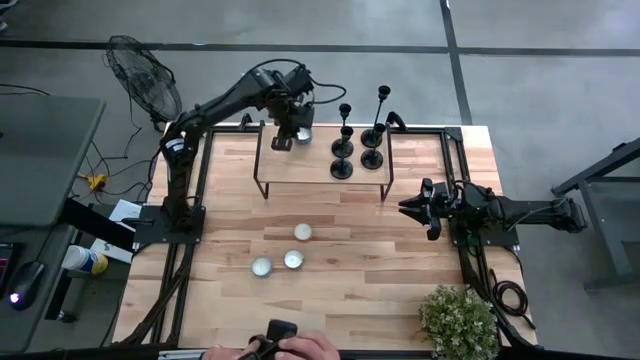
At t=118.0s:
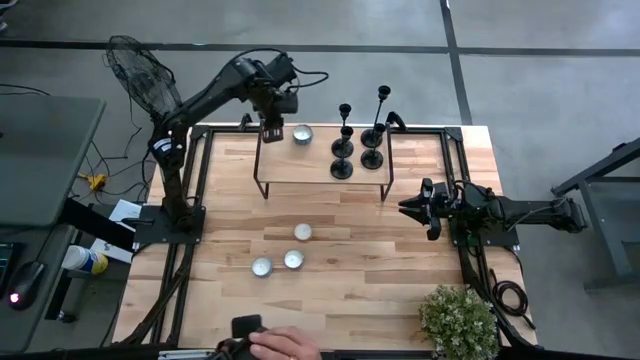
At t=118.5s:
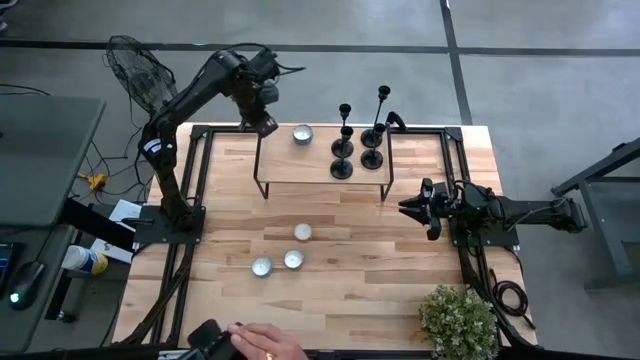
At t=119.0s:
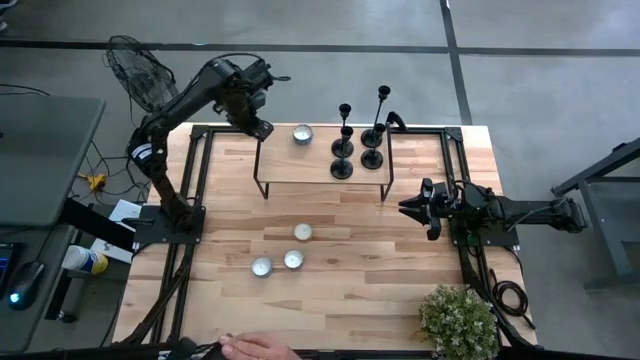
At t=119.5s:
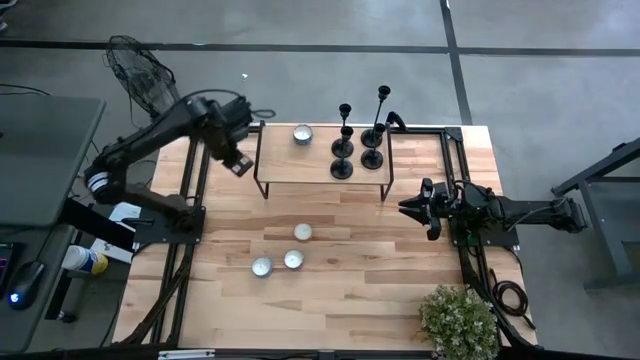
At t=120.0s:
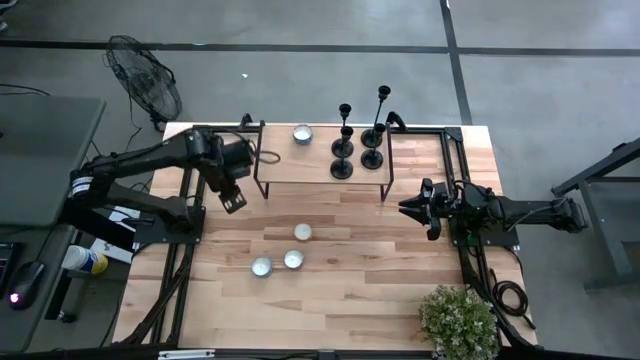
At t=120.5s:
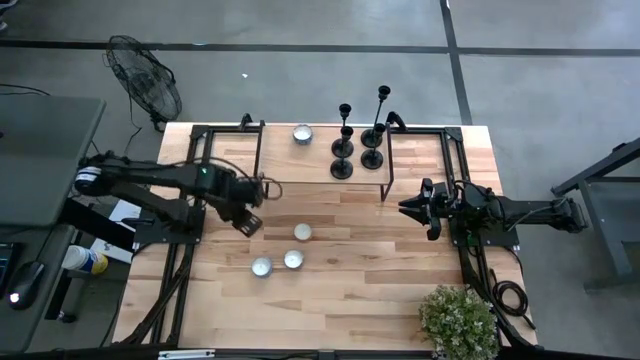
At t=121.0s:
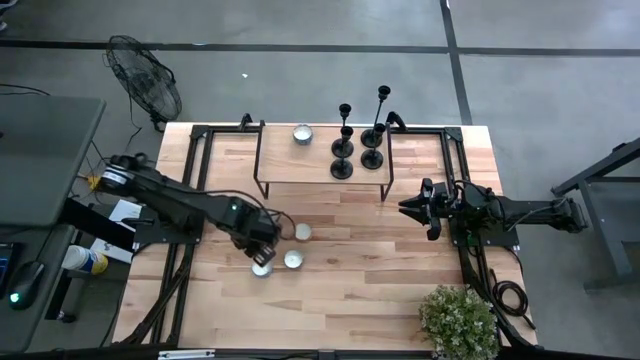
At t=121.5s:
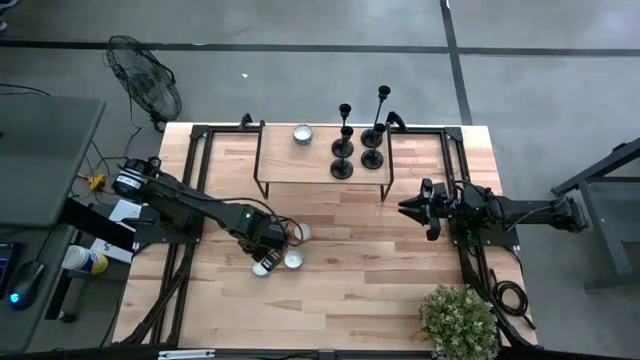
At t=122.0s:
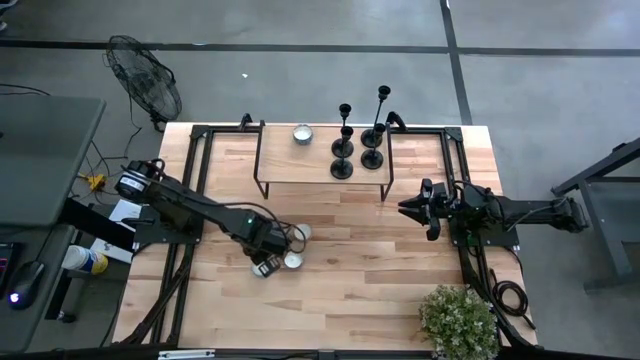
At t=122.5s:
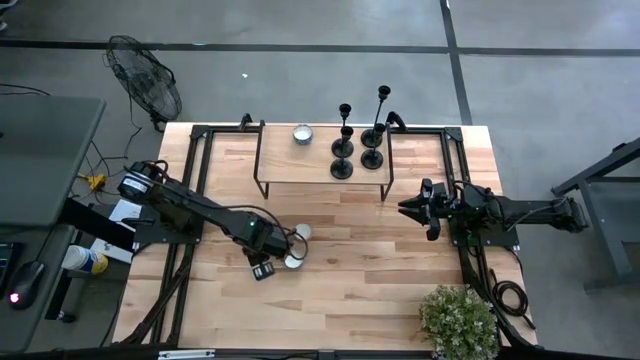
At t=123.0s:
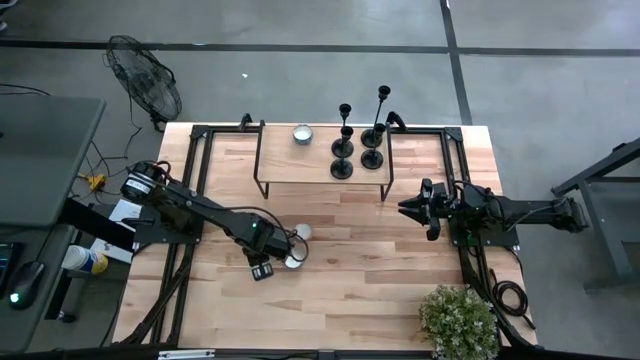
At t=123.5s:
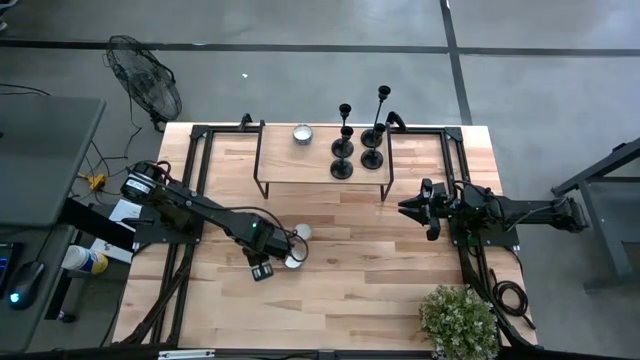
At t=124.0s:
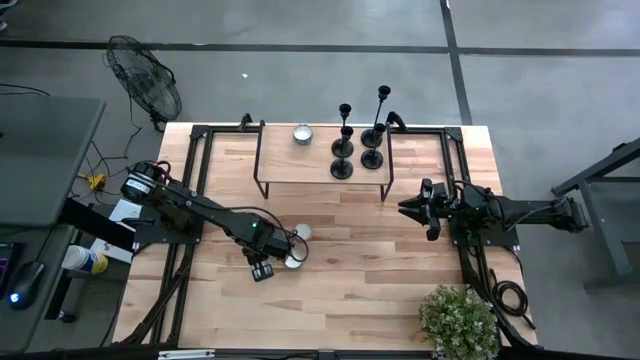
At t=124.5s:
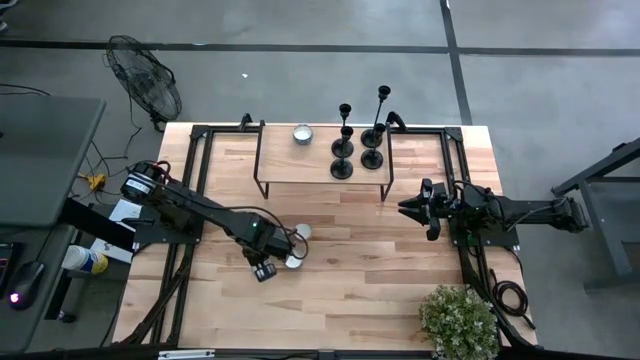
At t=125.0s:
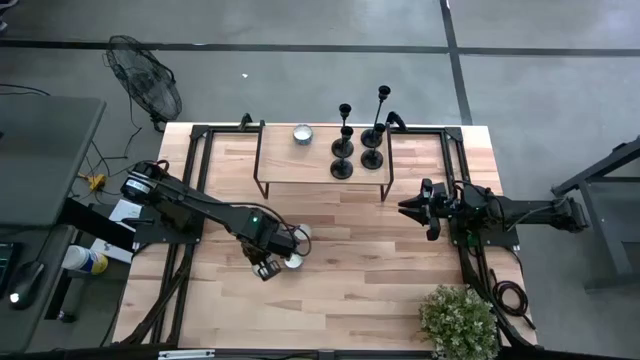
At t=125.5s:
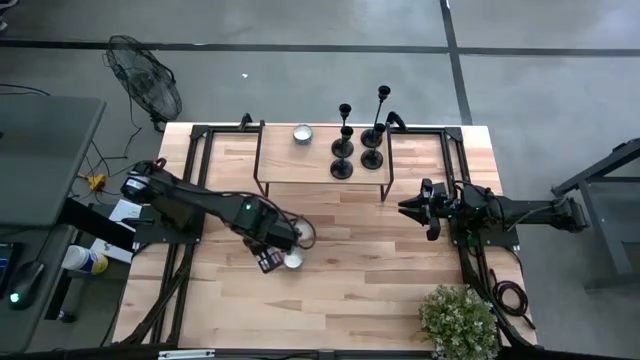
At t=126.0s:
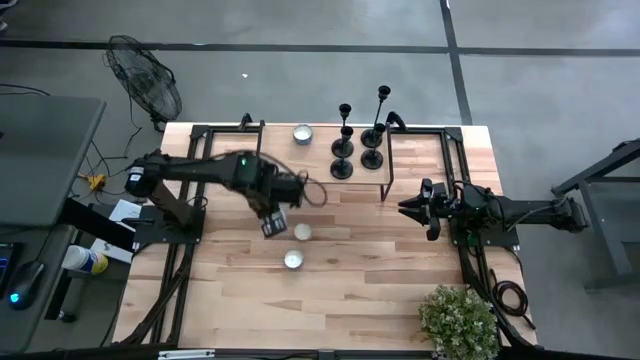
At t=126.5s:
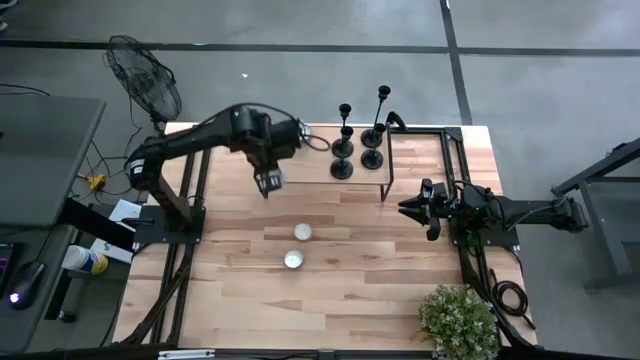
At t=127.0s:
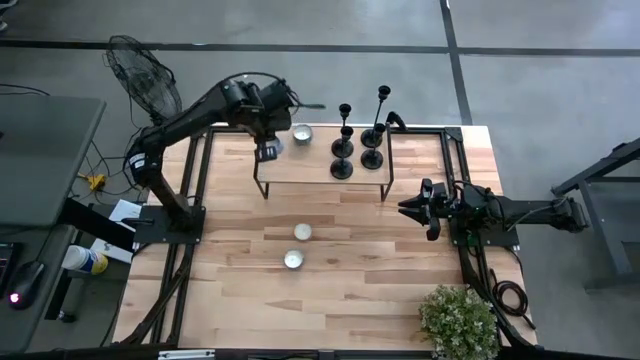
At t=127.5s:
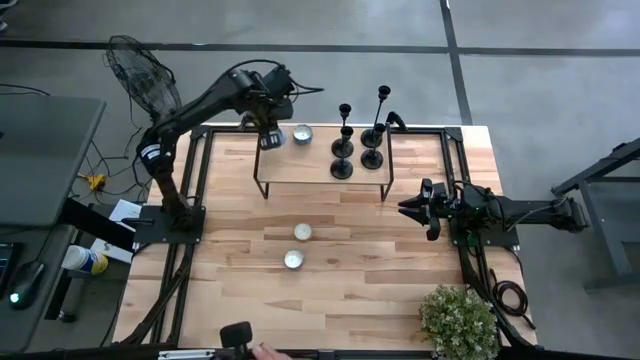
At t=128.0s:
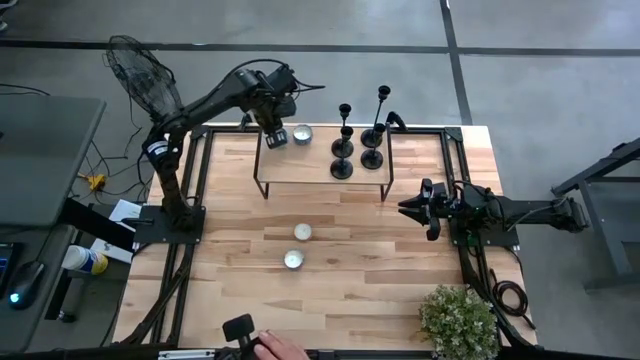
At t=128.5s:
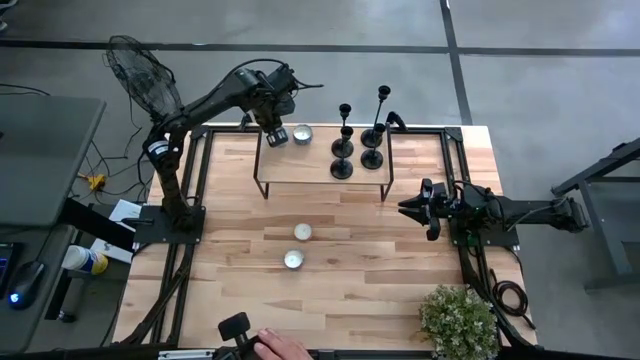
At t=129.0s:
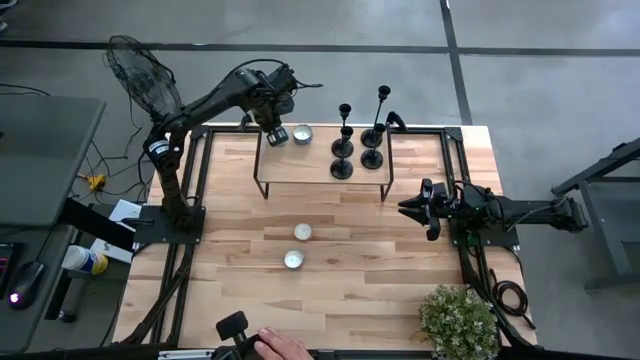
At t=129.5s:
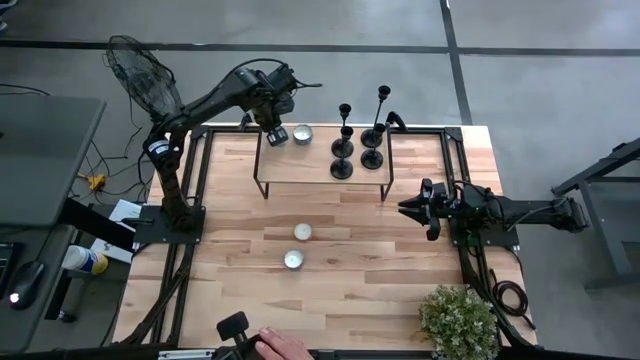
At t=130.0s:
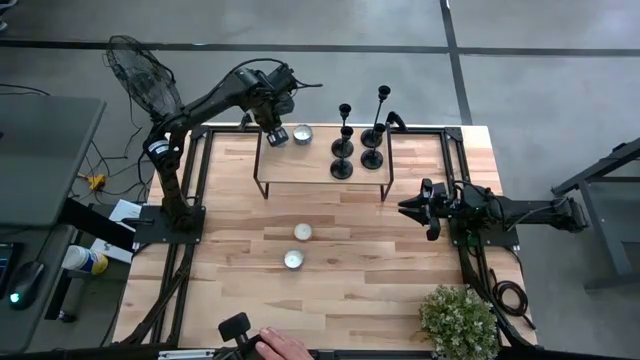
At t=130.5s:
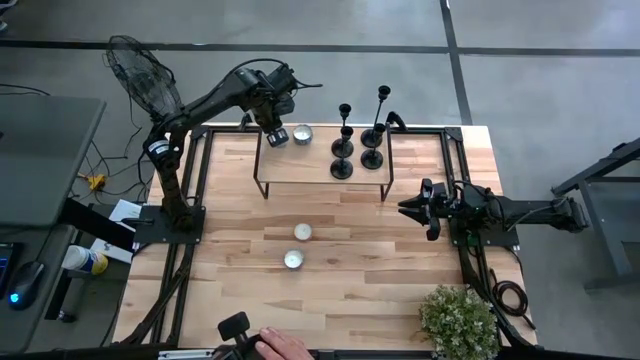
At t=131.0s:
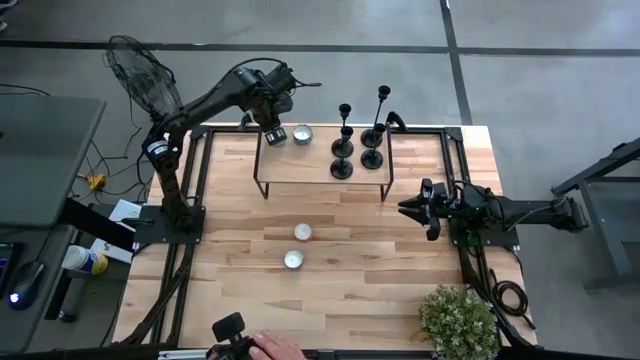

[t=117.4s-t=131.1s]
Task: Pick & Place candle stick holders
Put the light blue scented candle on the shelf

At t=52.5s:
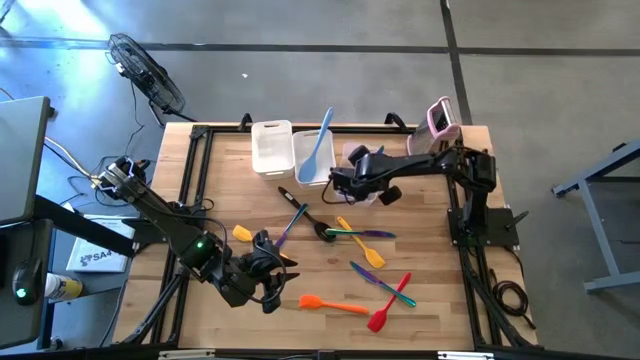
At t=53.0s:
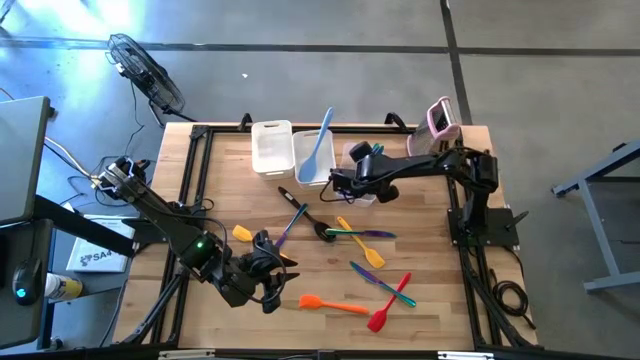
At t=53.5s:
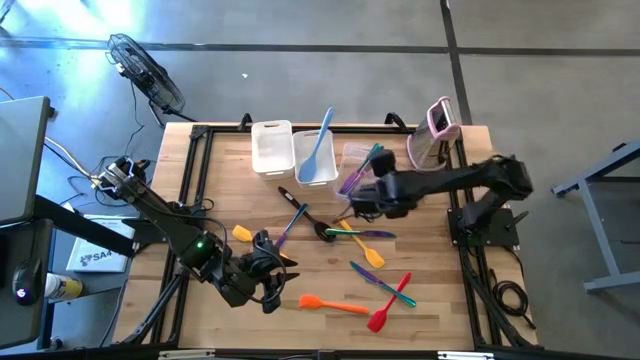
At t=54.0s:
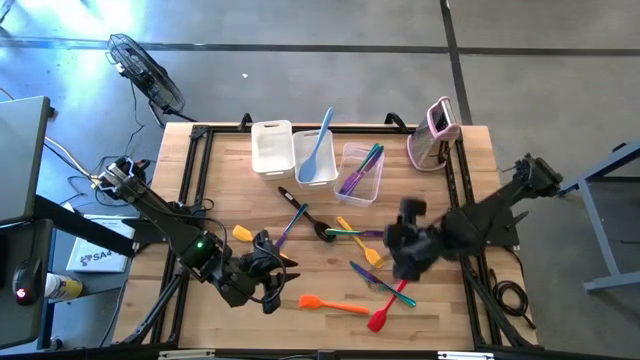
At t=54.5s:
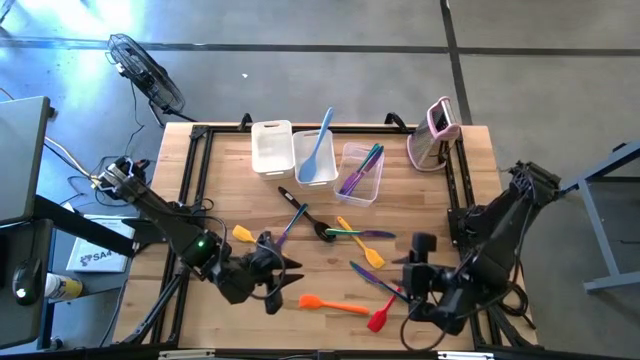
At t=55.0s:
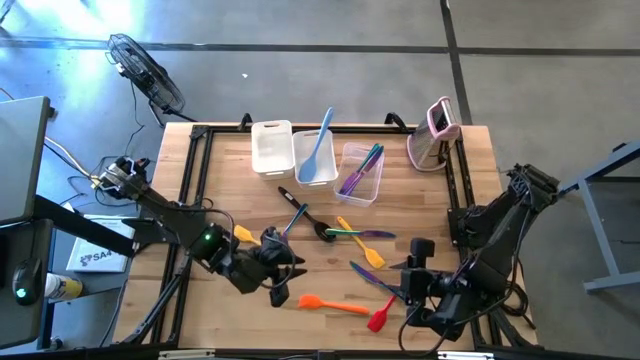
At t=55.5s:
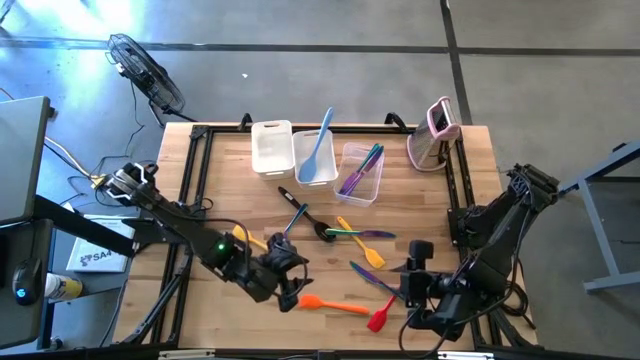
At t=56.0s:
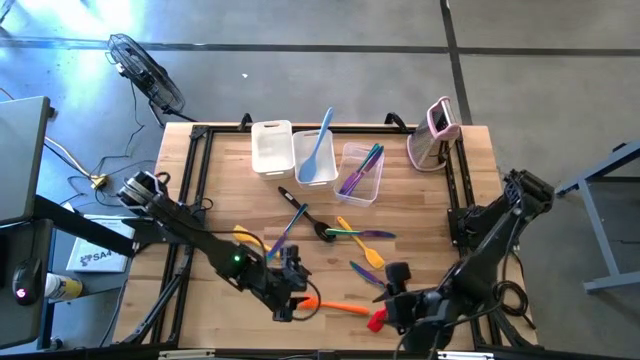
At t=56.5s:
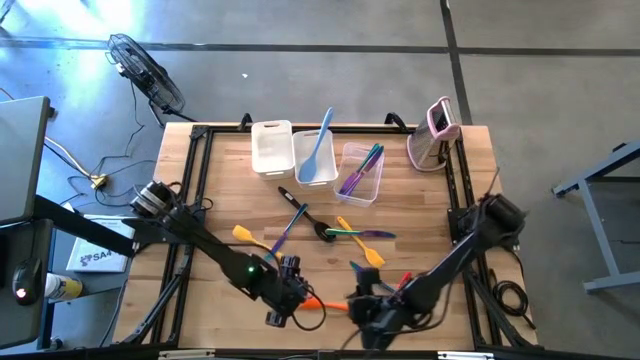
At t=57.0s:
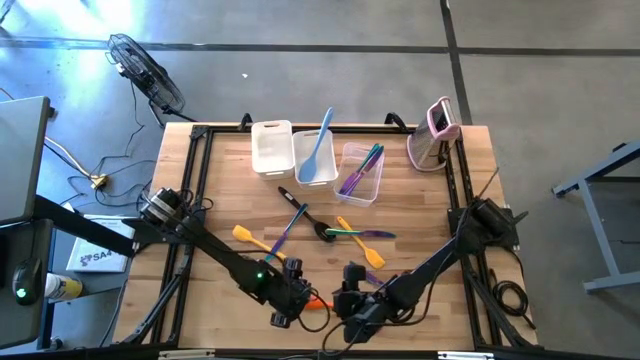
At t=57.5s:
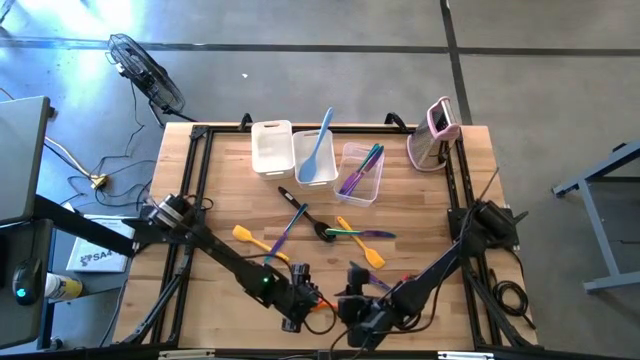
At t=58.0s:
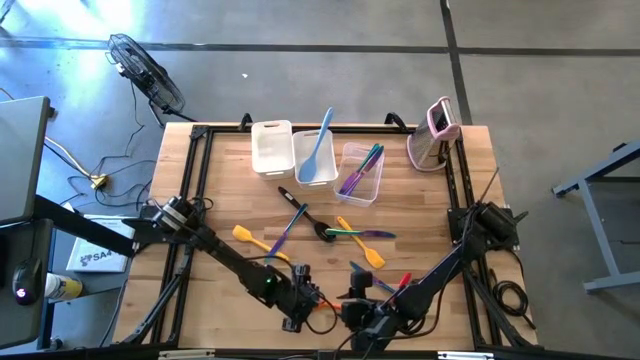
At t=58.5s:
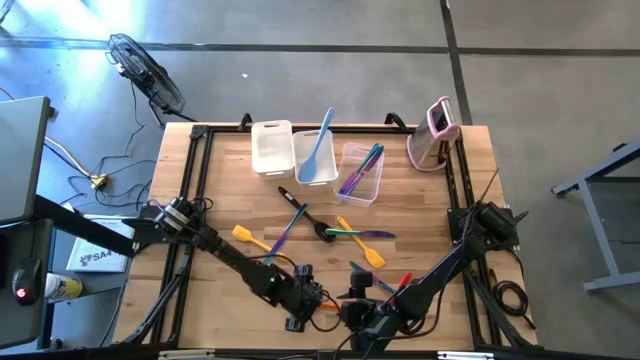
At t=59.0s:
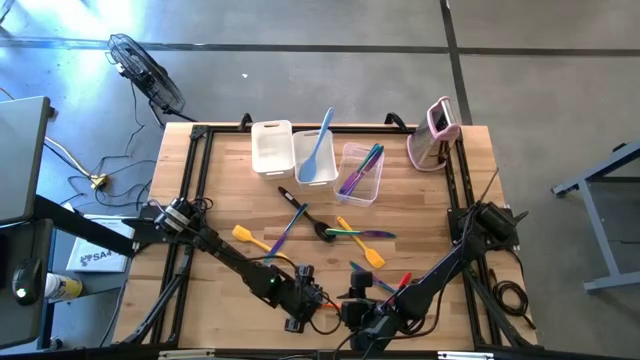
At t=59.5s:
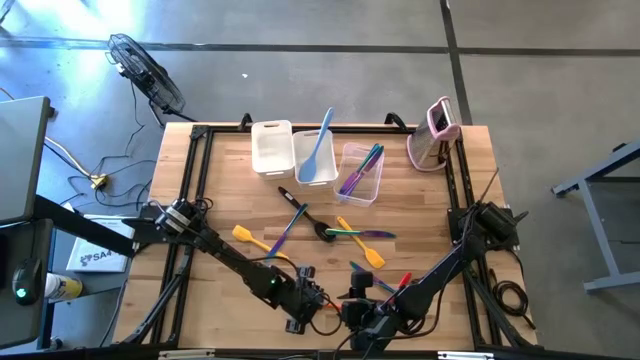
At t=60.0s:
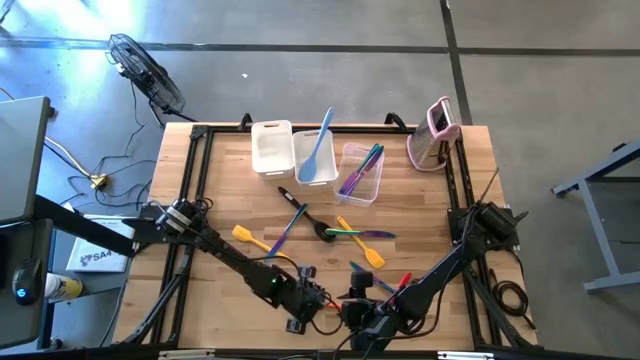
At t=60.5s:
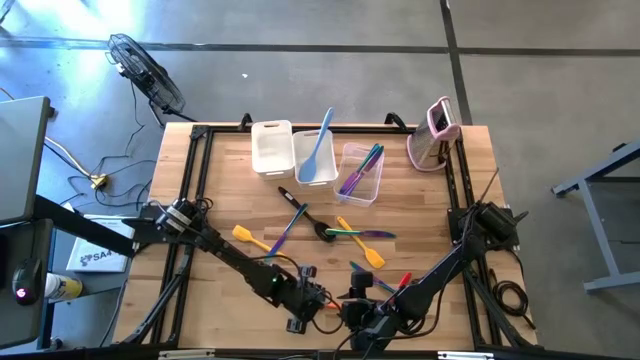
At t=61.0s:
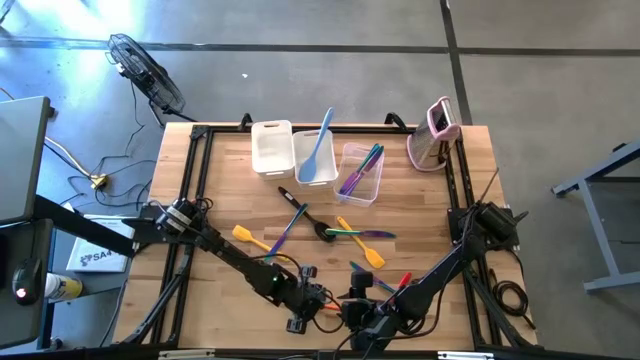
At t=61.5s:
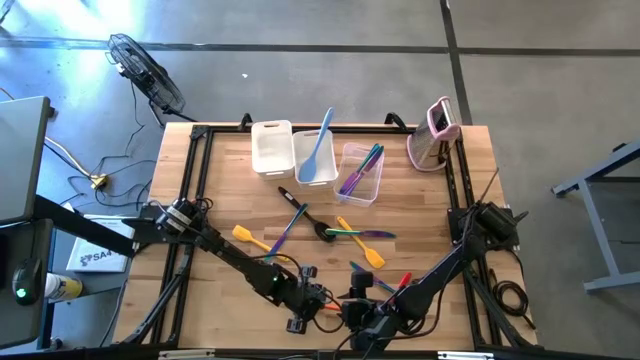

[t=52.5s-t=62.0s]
Task: Pick & Place Kitchen Items
Put the orange spatula into the left white bin
